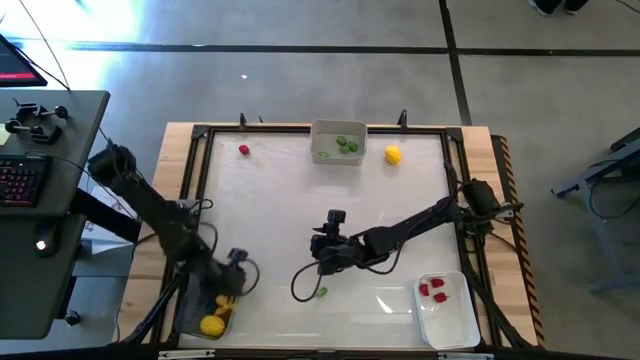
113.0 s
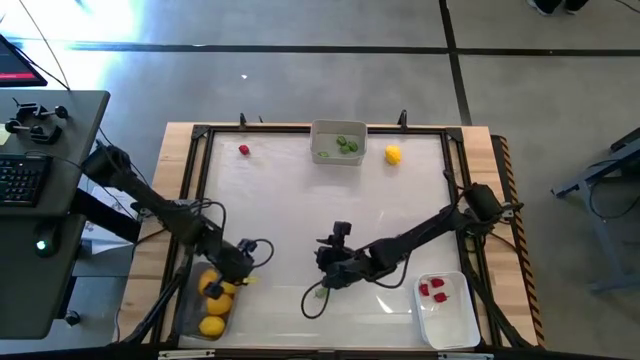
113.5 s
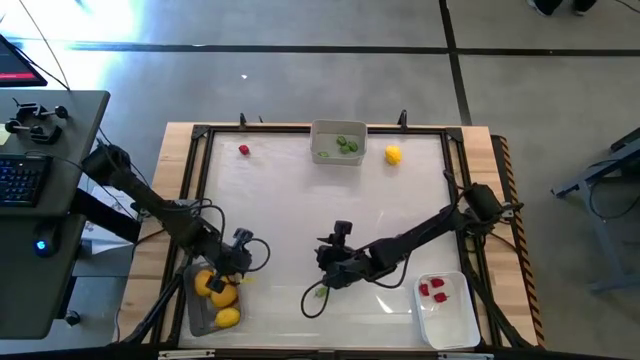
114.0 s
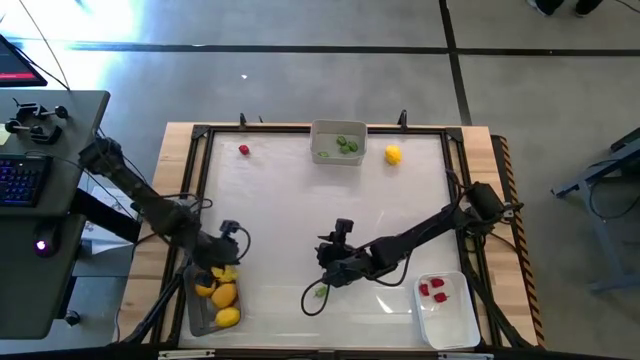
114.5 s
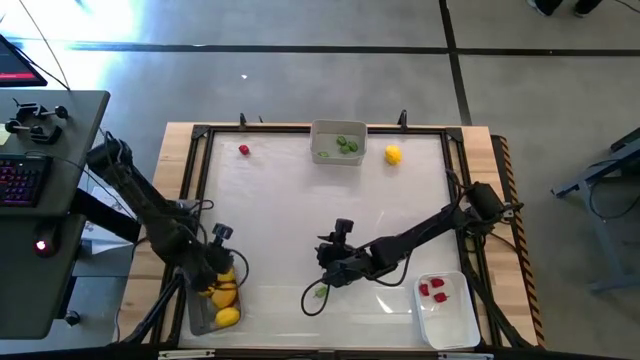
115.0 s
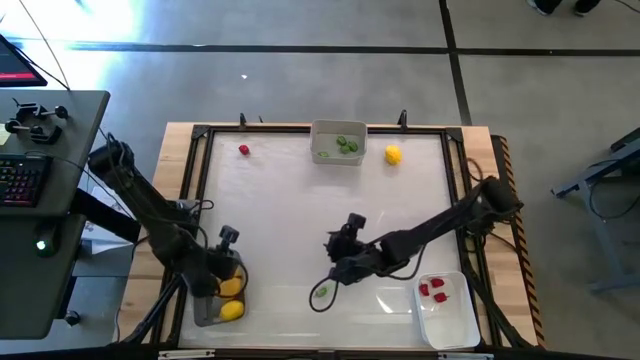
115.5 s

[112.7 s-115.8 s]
Task: Sort produce into baskets
Adjust the black bin

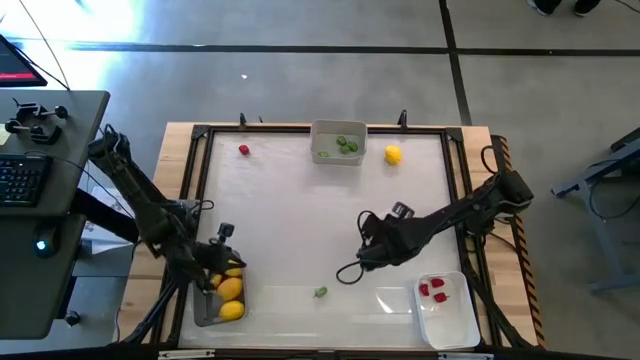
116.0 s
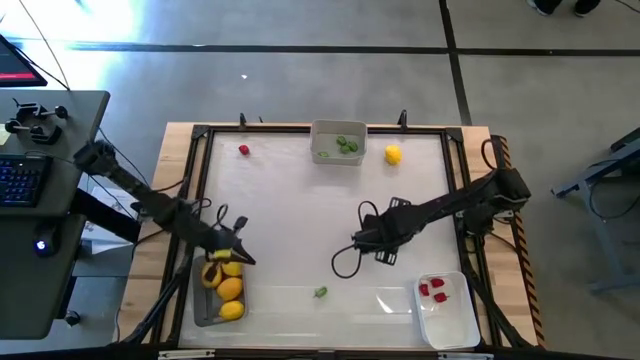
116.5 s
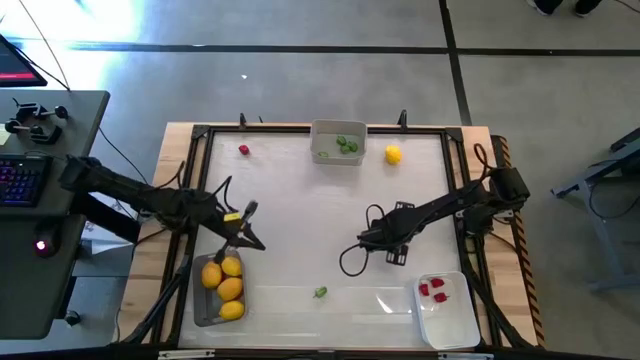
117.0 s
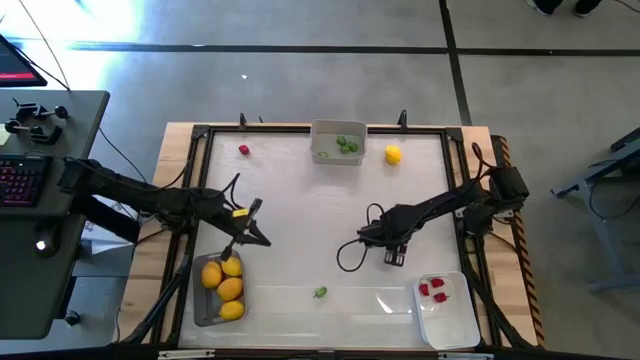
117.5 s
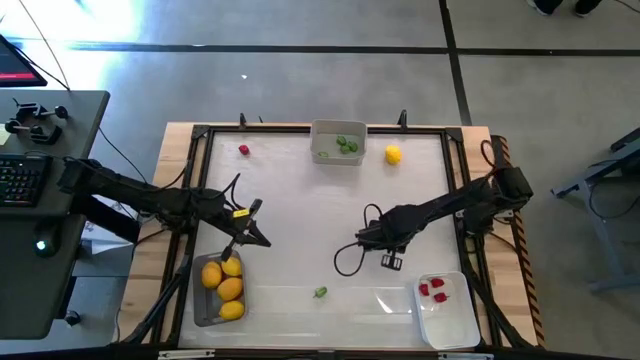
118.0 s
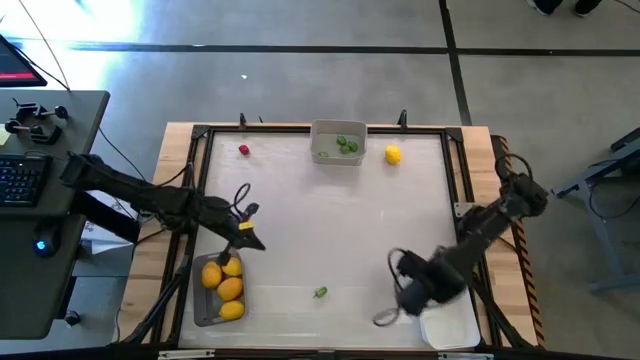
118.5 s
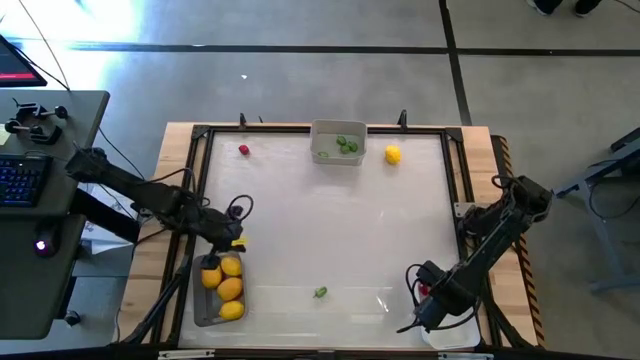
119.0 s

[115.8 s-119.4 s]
Put the red chili pepper into the white bin

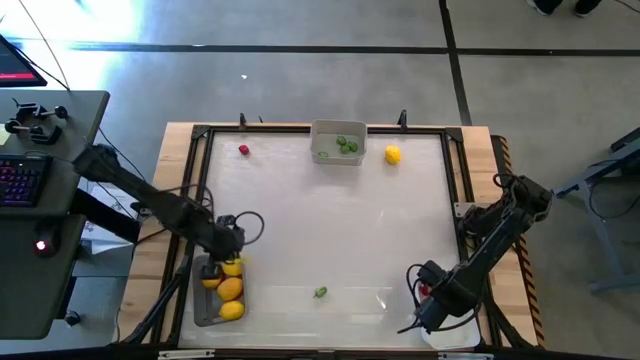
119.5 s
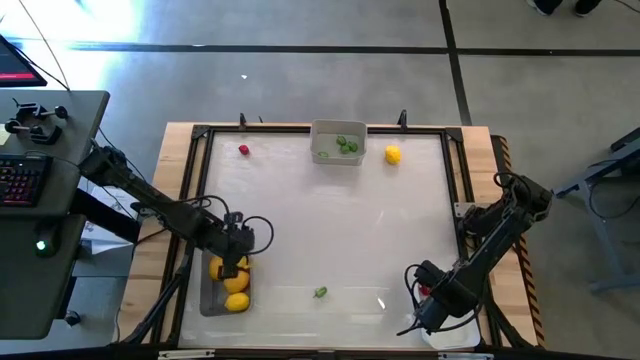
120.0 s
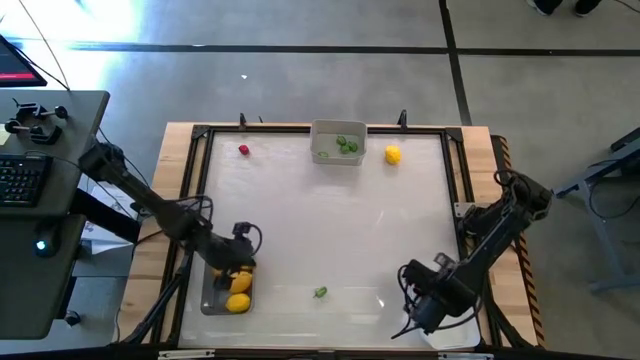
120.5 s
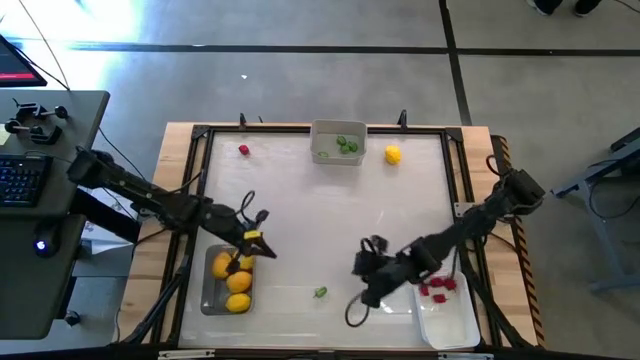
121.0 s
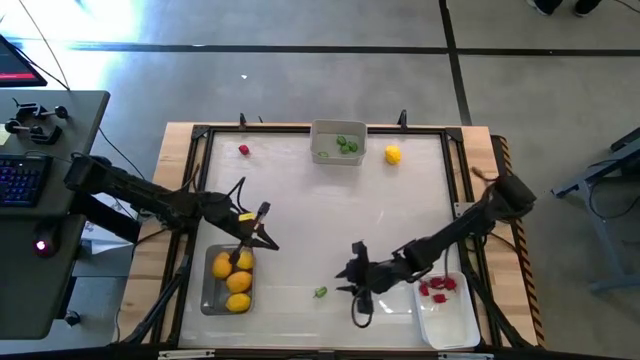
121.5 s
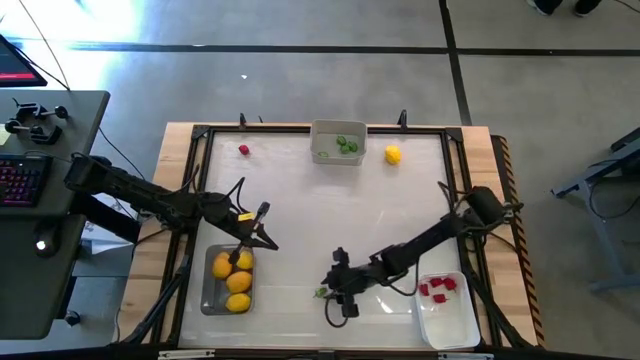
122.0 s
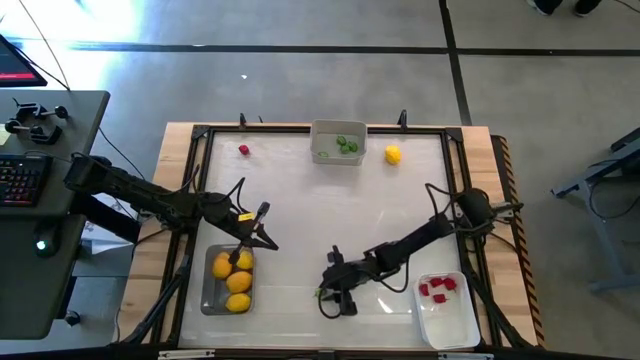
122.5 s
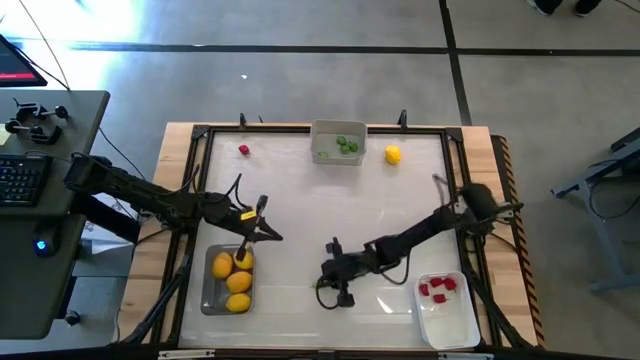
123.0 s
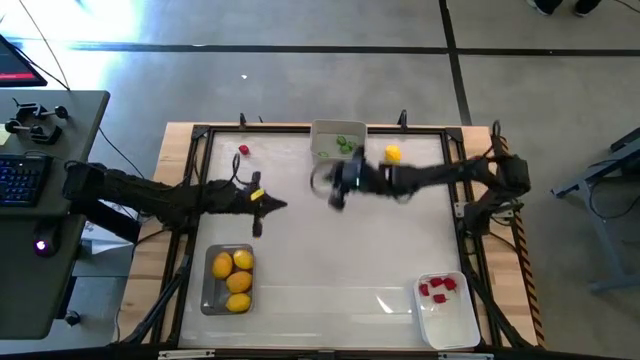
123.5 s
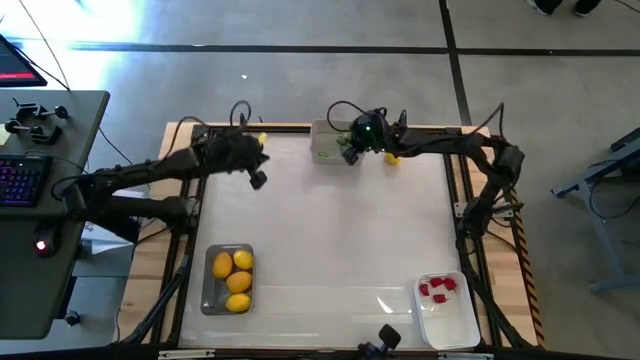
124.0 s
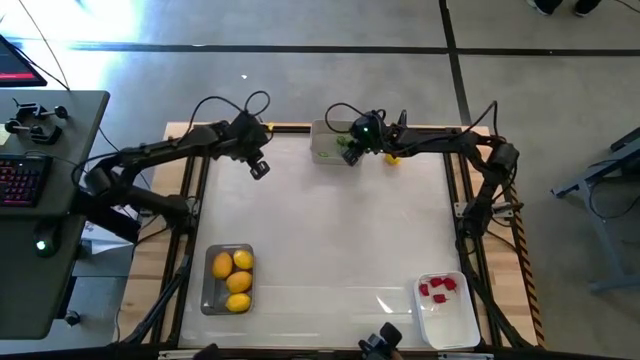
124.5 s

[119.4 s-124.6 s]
Put the green chili pepper into the gray bin

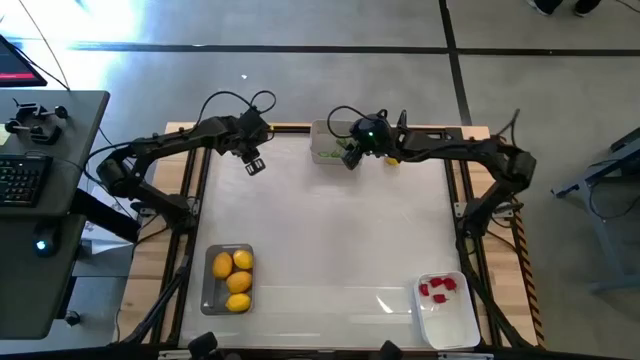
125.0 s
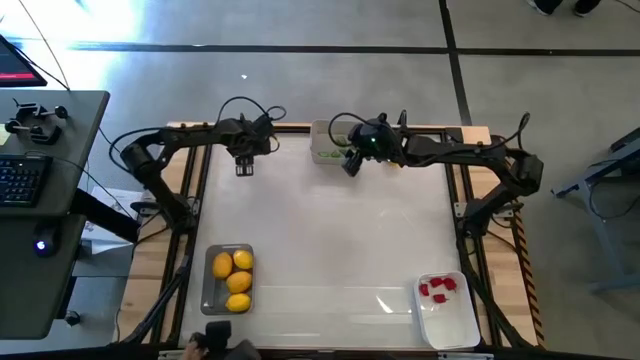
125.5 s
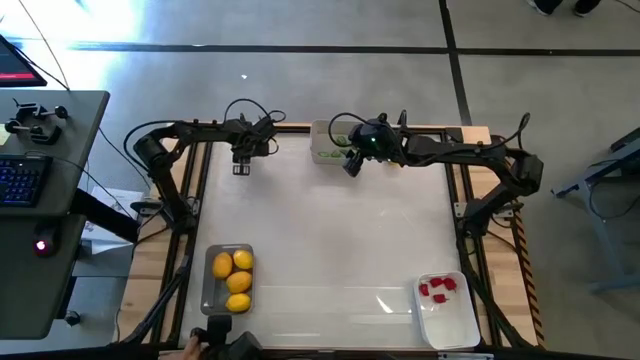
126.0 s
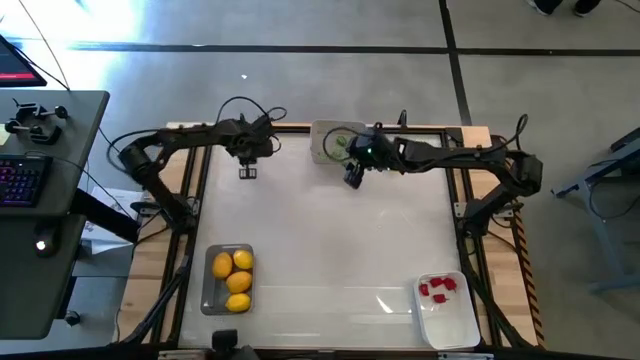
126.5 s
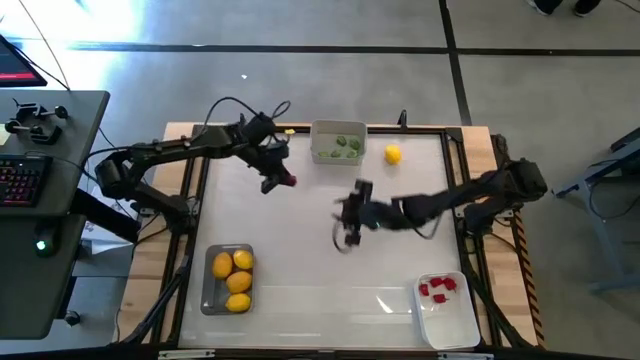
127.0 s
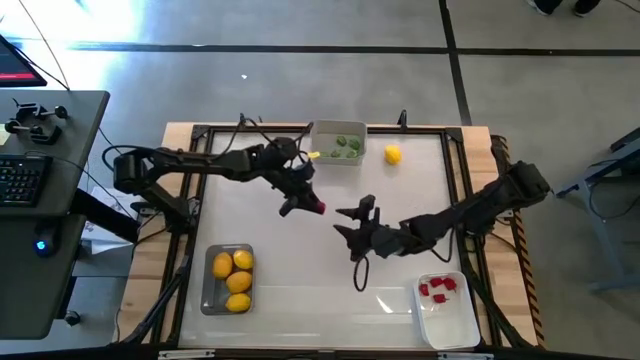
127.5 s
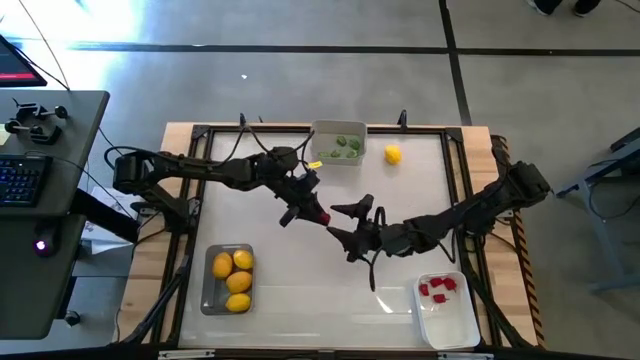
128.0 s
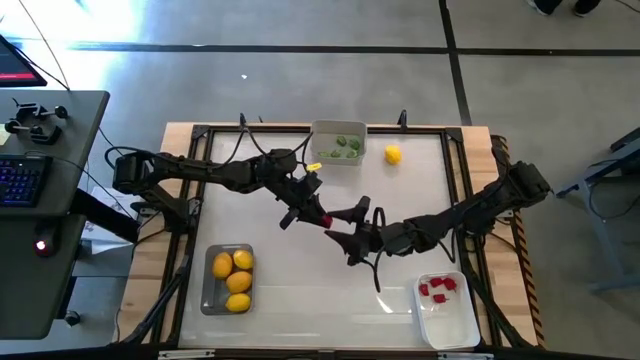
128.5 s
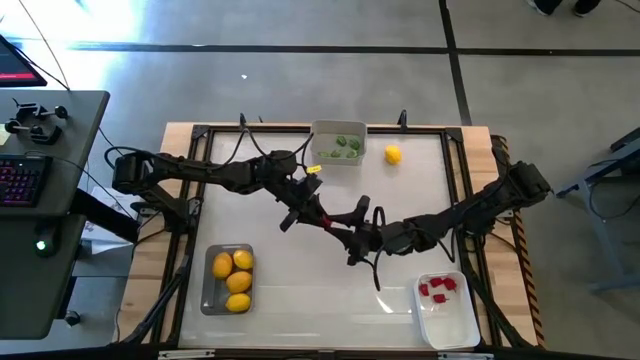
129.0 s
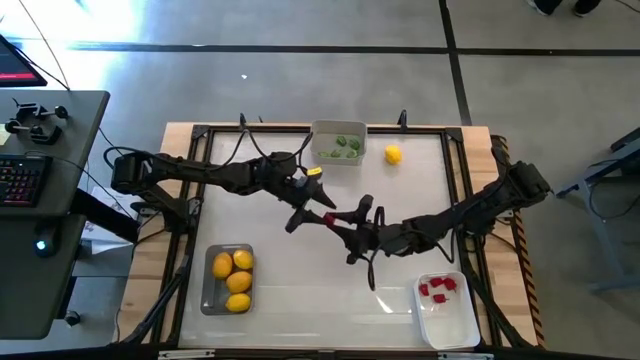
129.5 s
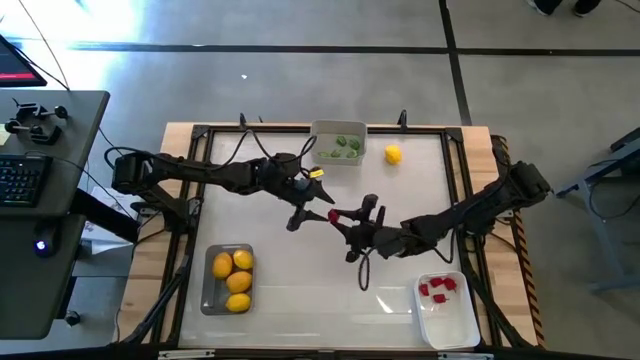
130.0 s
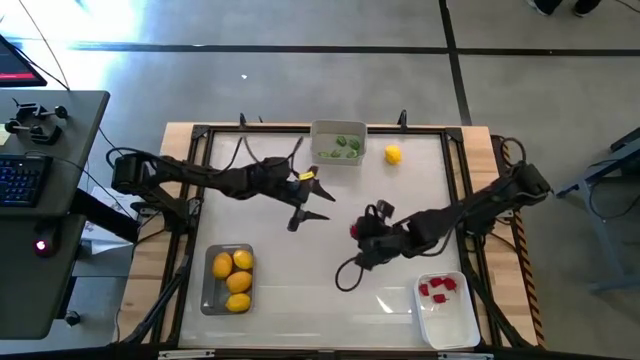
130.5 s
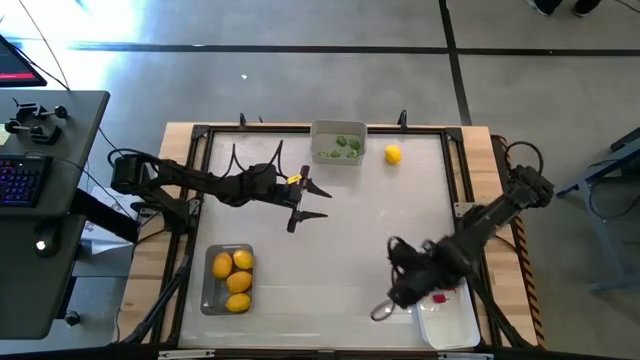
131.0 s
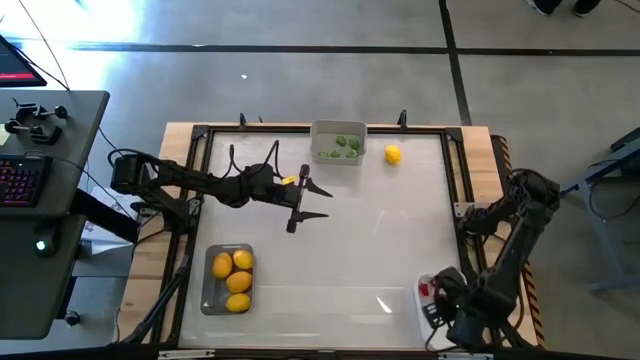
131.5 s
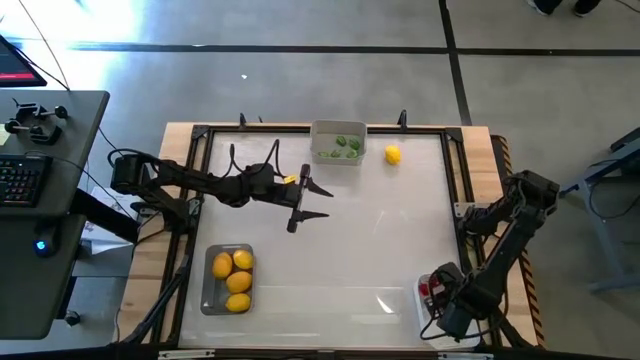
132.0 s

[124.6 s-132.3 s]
Put the red chili pepper into the white bin

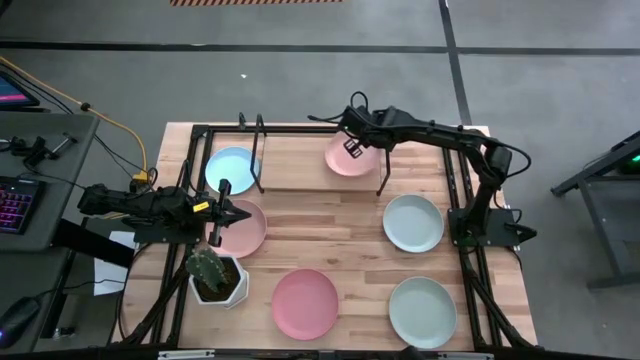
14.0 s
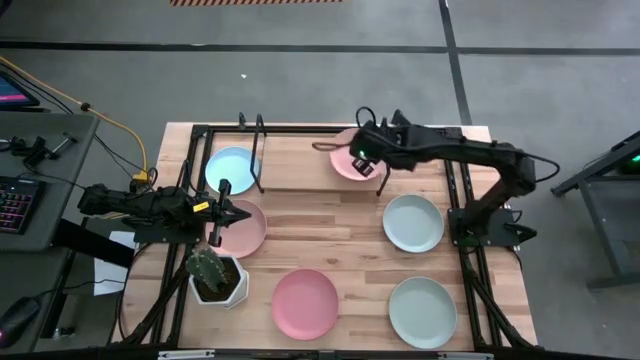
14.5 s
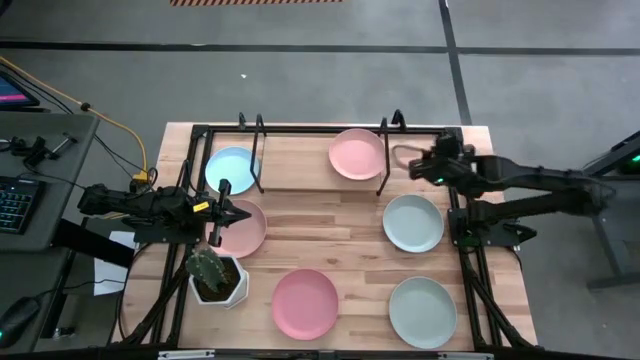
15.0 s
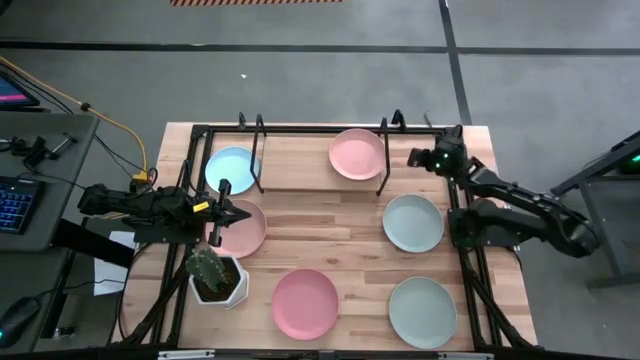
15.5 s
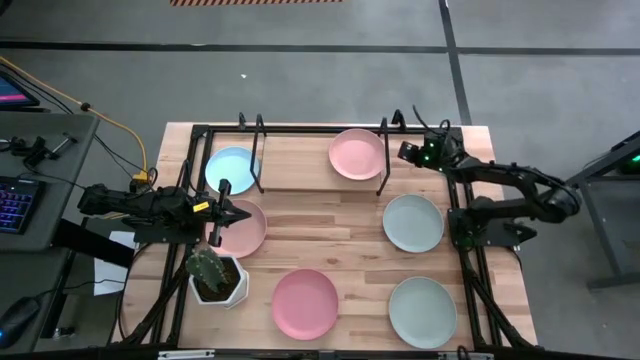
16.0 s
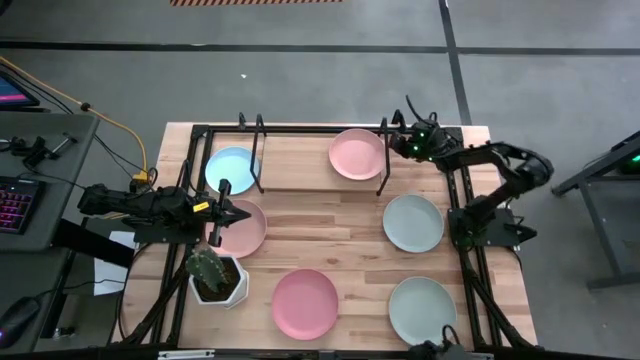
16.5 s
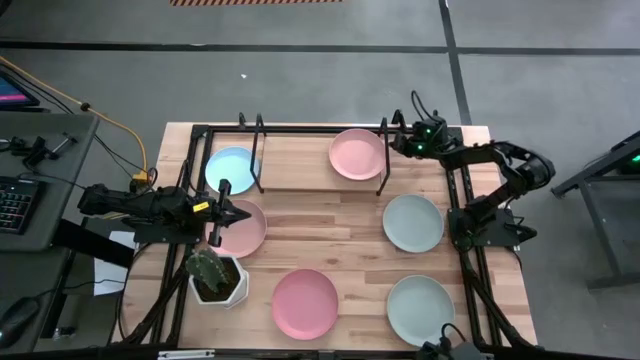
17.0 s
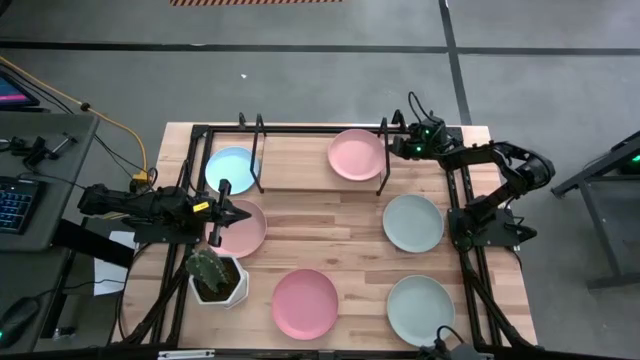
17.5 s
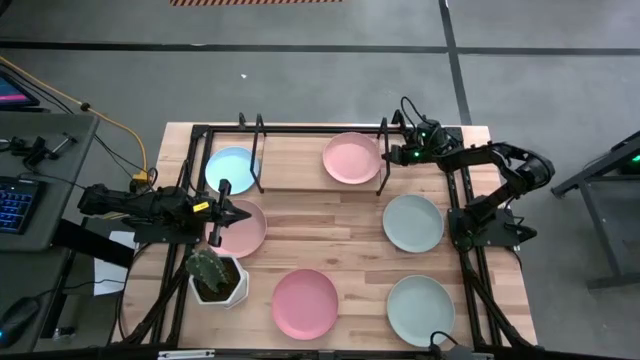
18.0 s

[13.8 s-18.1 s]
Task: Place and stack plates onto a shelf
Adjust the light pink plate on the shelf
